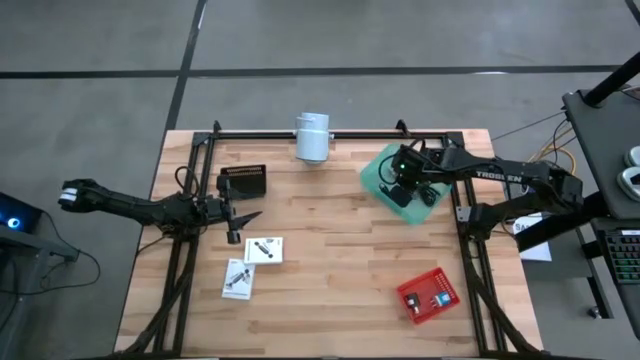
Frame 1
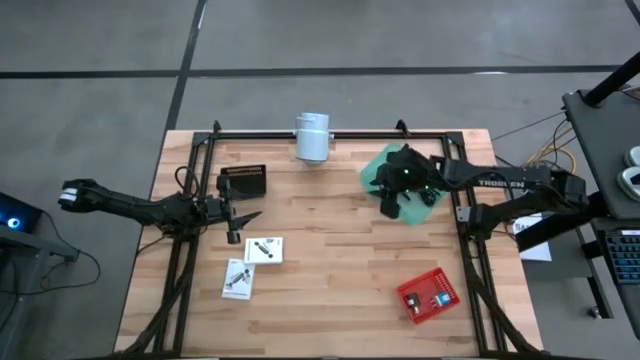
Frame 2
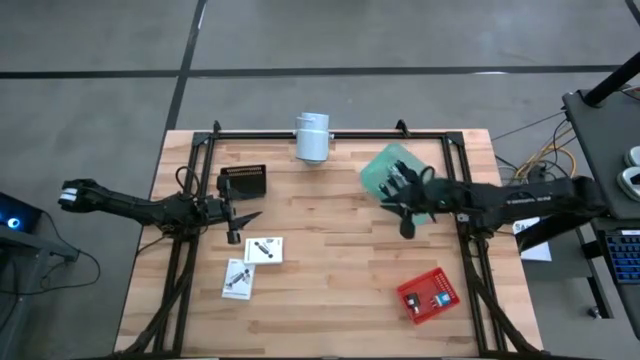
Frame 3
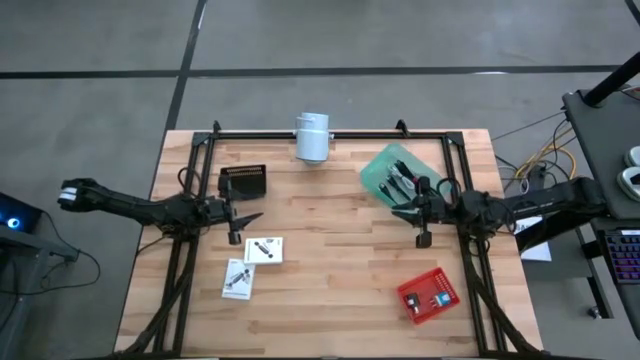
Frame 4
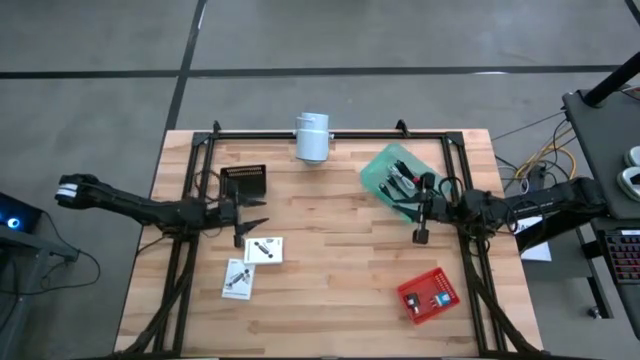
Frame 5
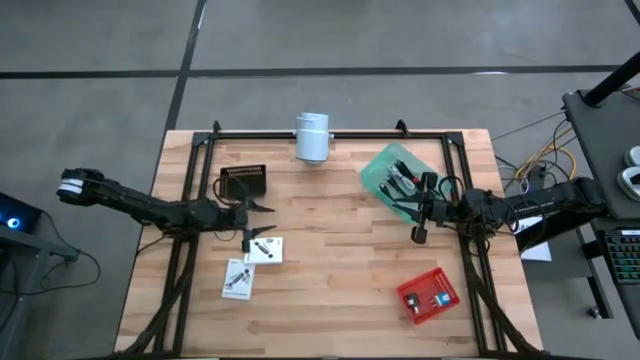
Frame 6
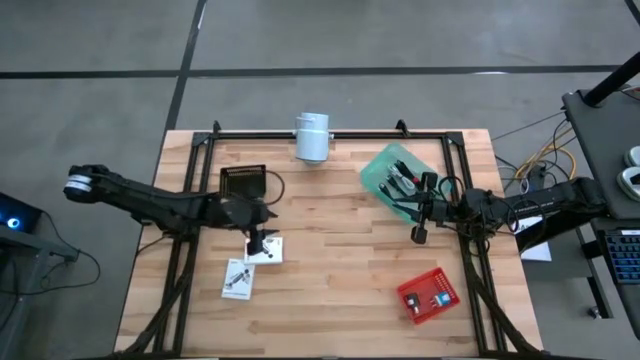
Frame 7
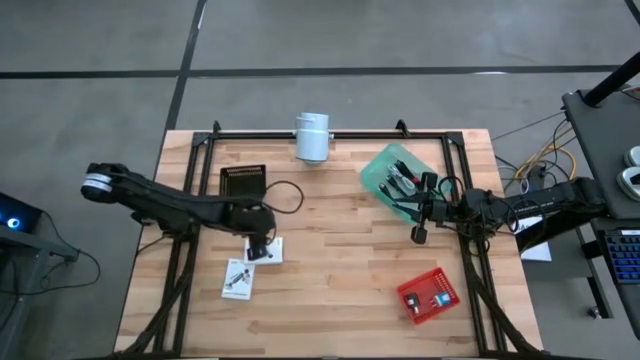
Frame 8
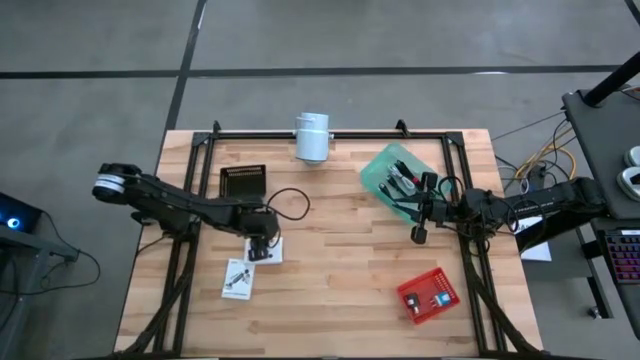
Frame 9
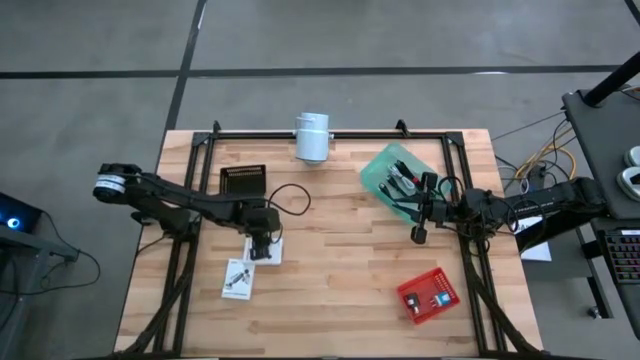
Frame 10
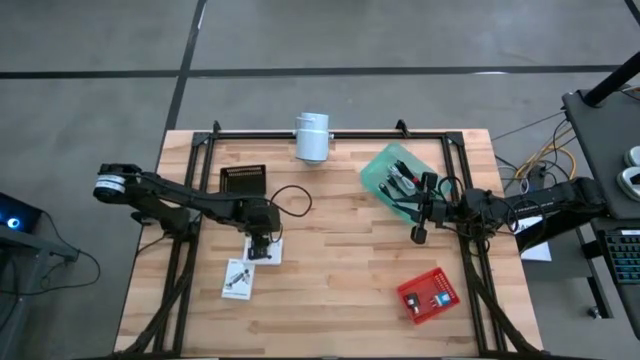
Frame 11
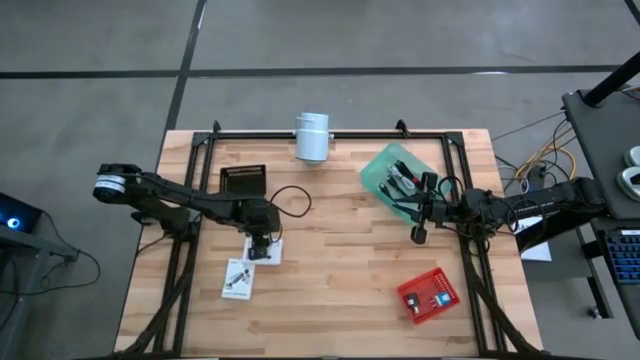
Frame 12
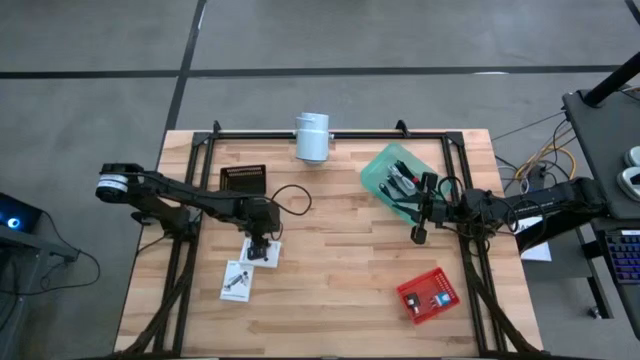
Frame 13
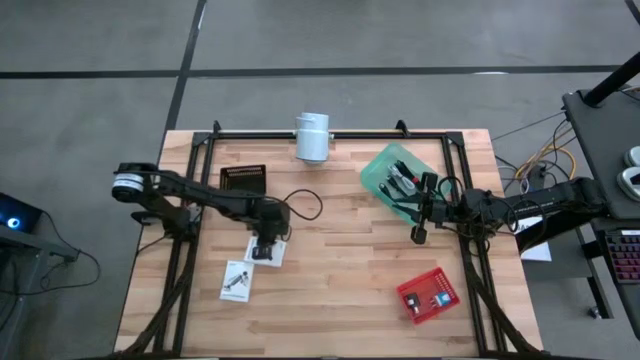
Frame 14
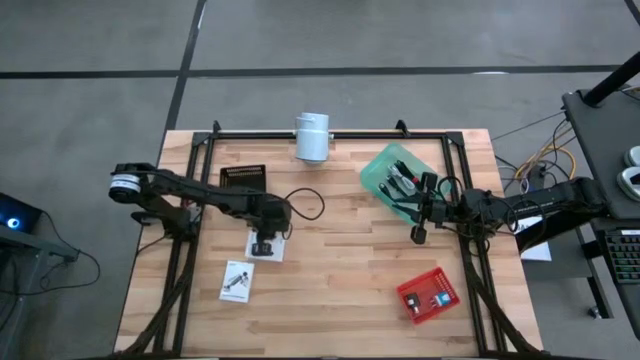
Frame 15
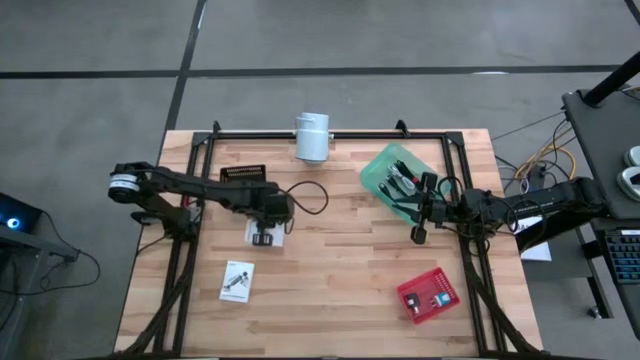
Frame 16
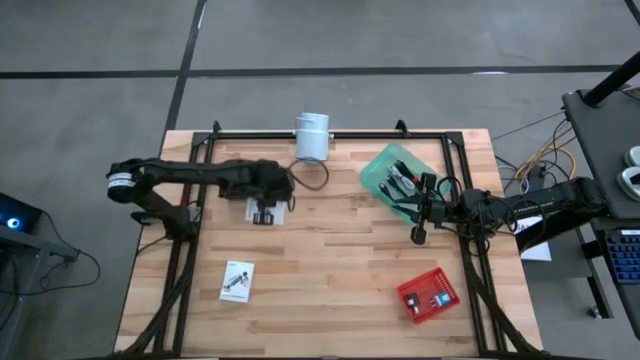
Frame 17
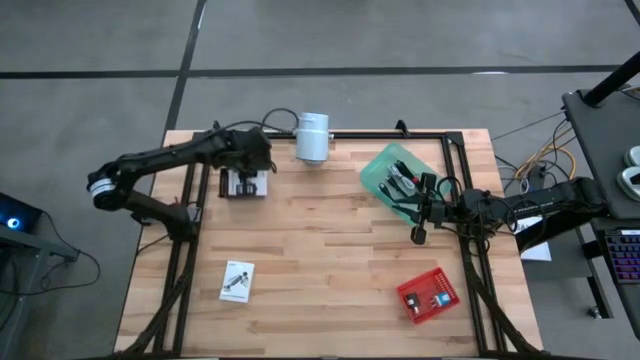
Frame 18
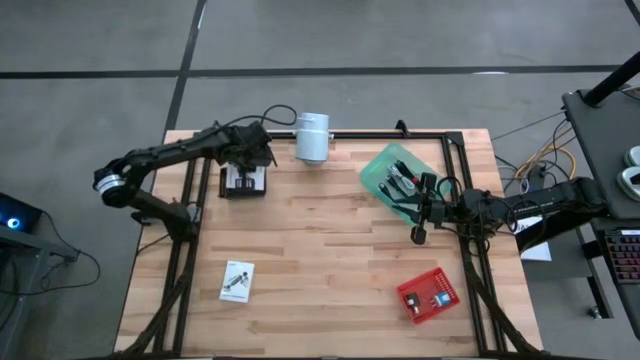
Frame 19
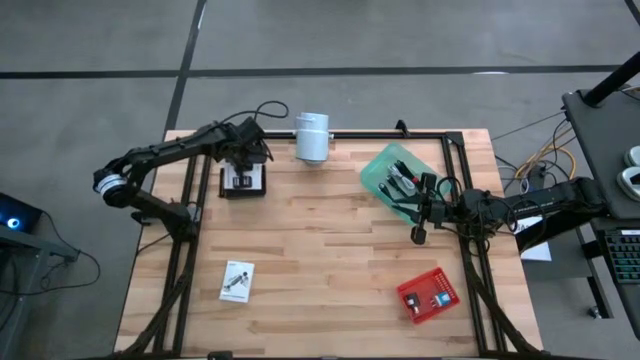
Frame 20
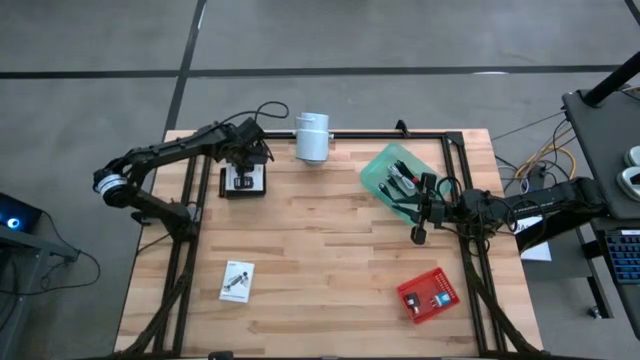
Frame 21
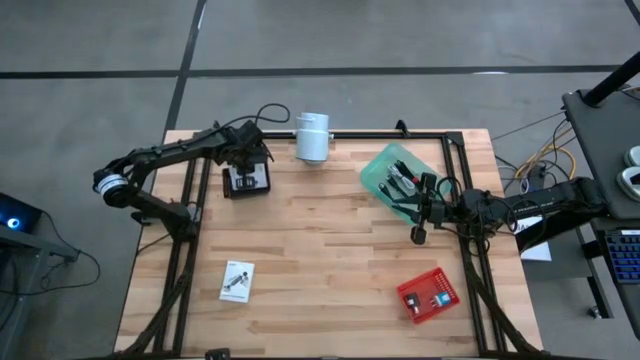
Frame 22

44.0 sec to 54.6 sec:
Task: Pick and place items into bin
Put the top white card reader box into the black bin

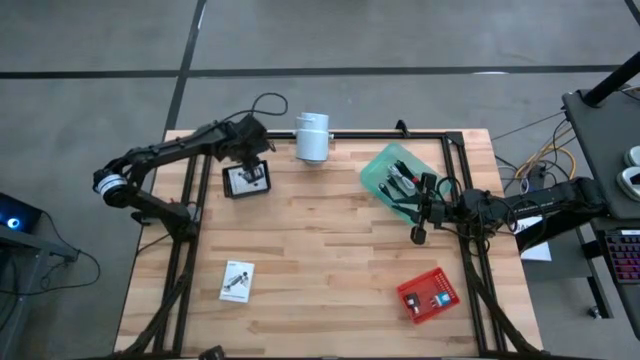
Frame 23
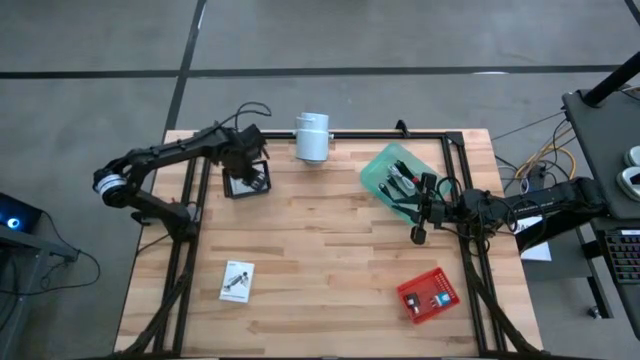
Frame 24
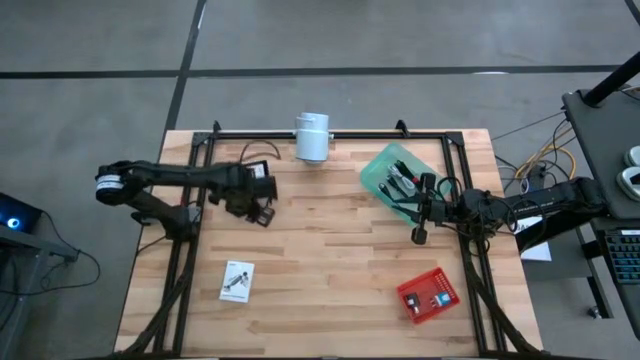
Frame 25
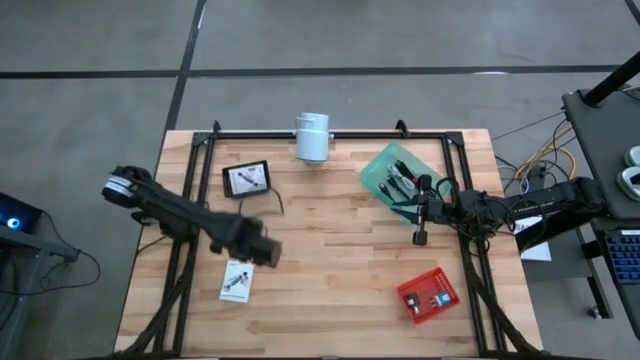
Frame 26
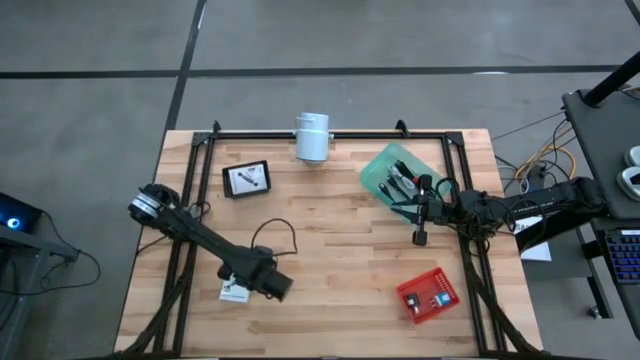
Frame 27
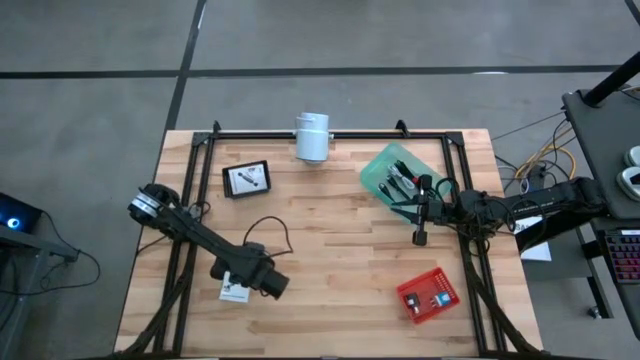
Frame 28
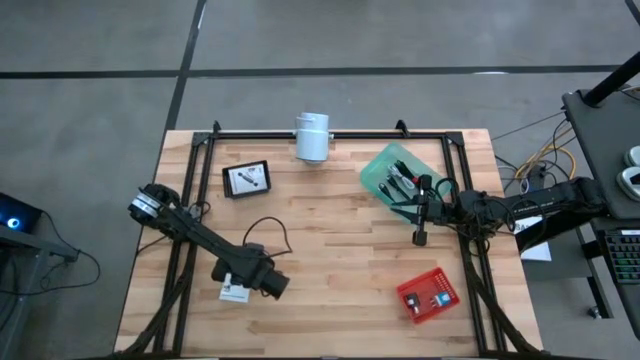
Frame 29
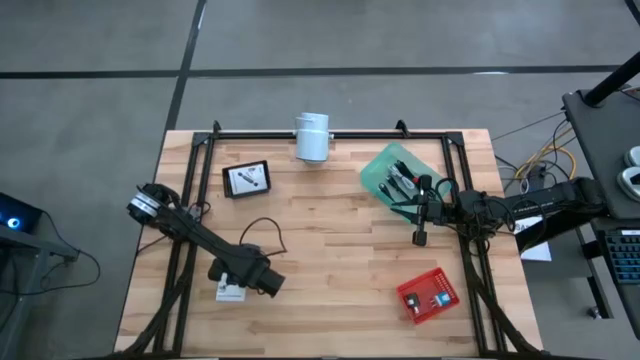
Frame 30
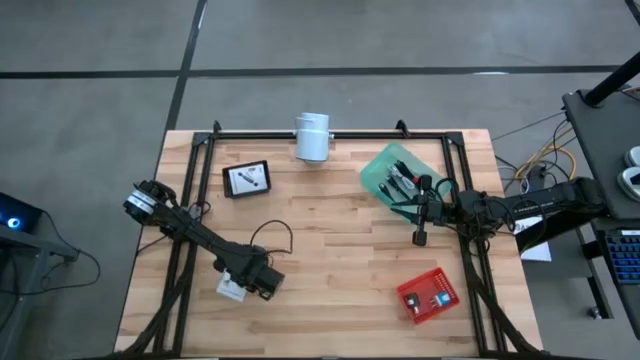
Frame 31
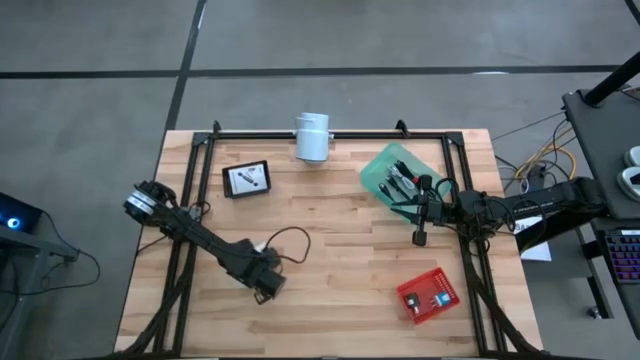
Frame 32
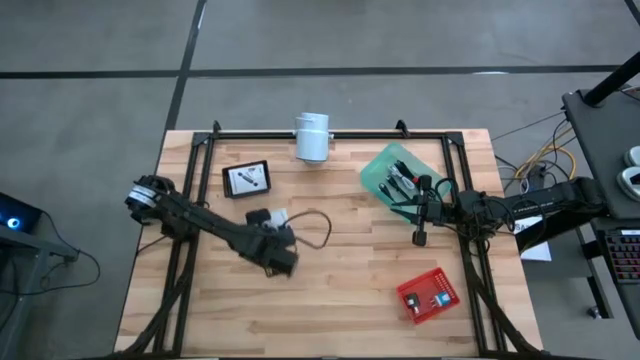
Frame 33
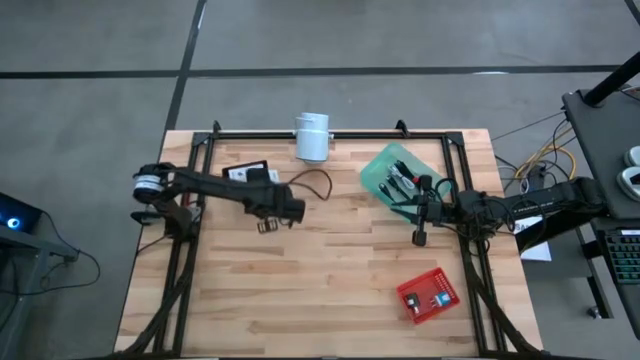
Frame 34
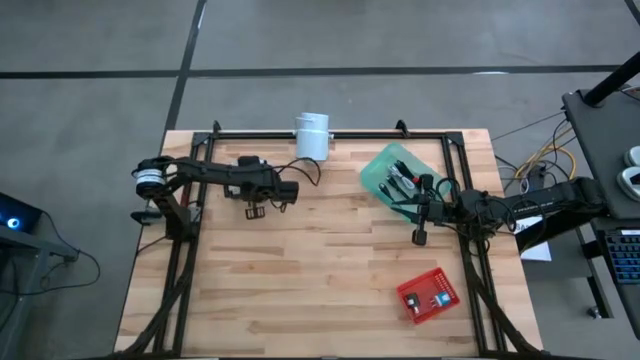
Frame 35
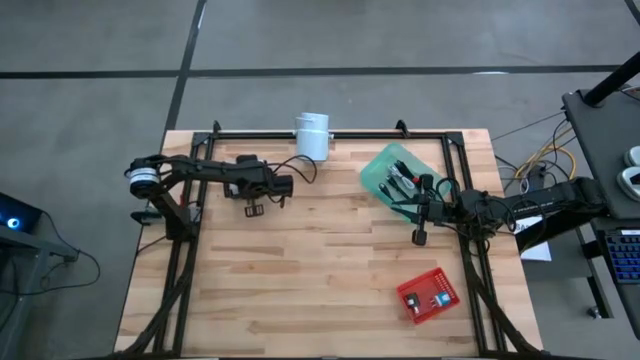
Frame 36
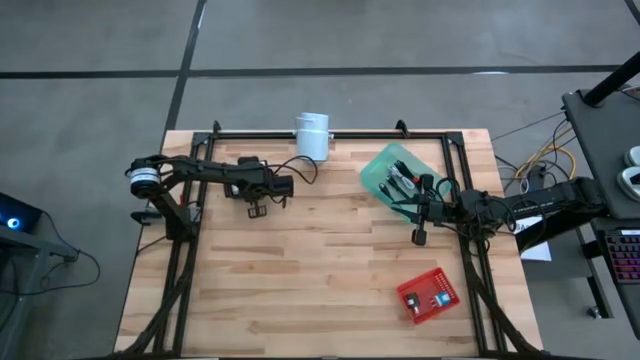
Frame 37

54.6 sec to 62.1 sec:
Put the white card reader box into the black bin

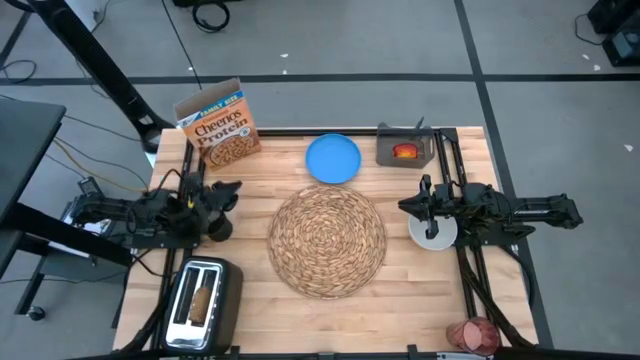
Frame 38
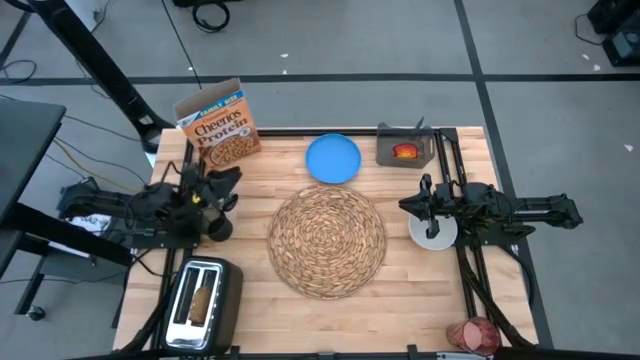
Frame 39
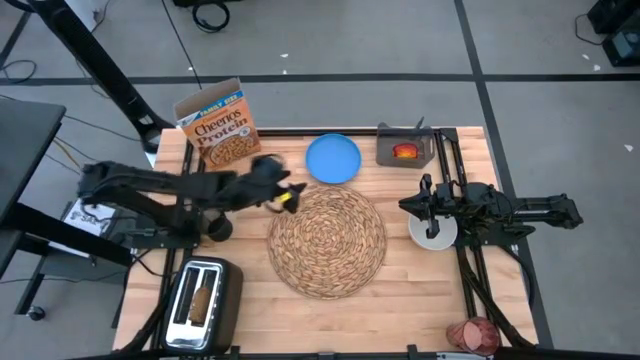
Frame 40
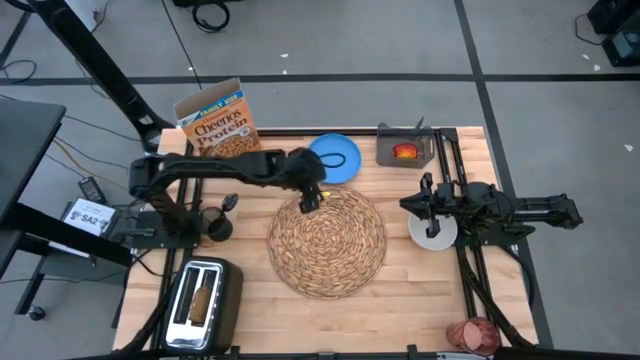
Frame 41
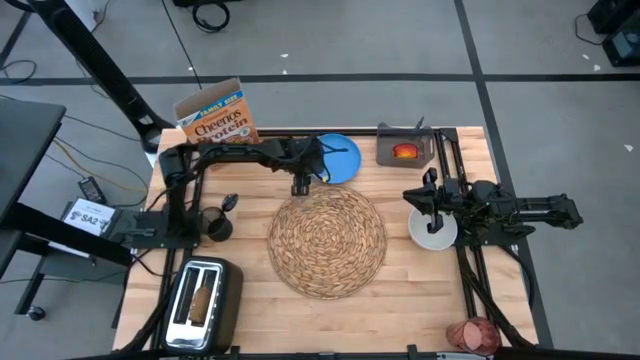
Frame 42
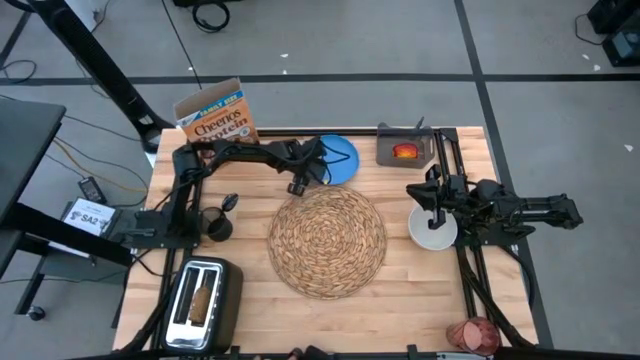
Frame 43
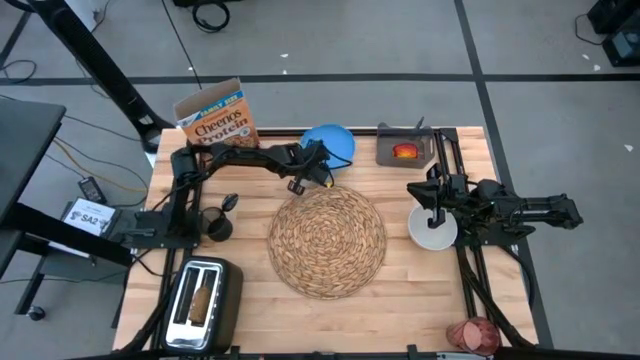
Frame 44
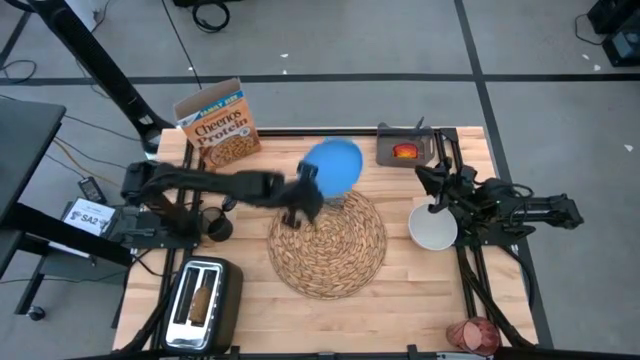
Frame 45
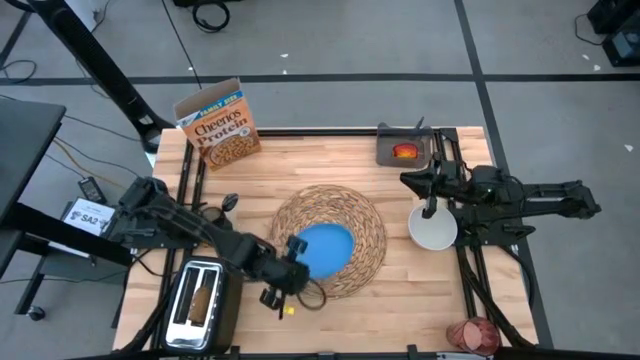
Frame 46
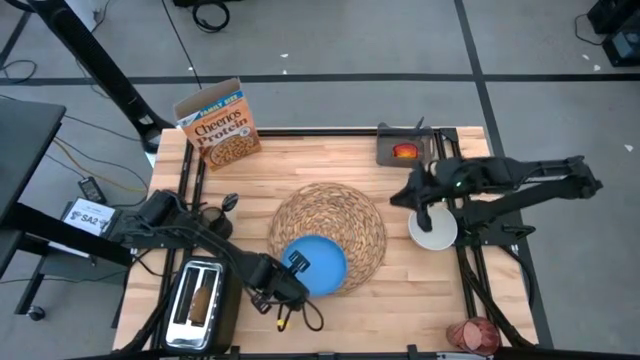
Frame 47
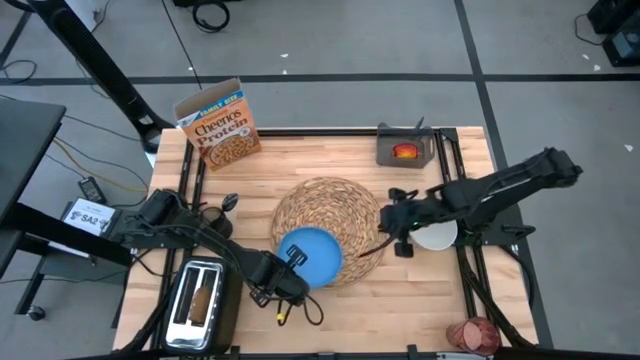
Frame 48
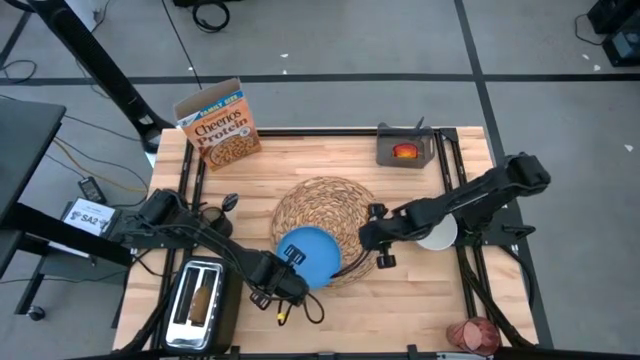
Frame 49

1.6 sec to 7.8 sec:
Task: Arrange a breakfast setting
Put the blue plate on the brown placemat
